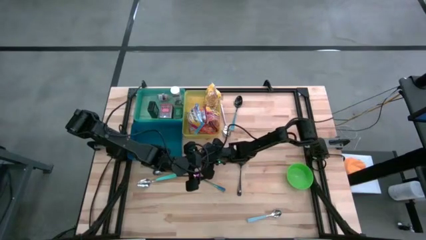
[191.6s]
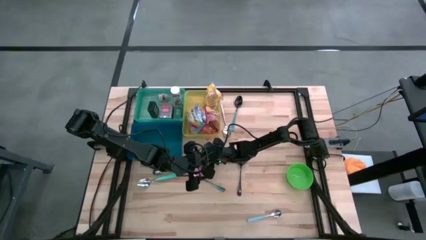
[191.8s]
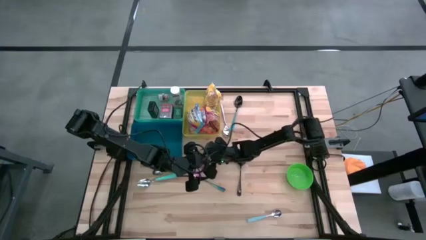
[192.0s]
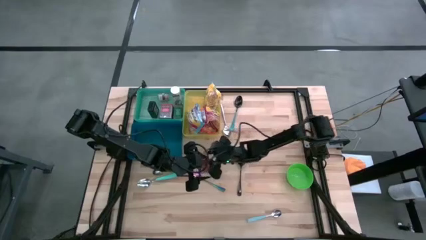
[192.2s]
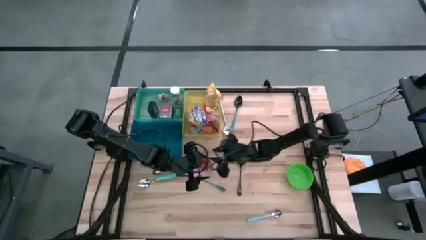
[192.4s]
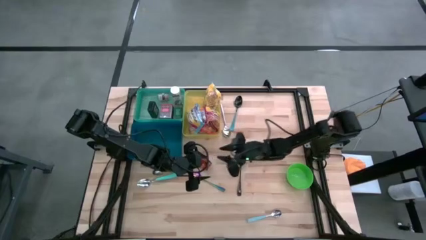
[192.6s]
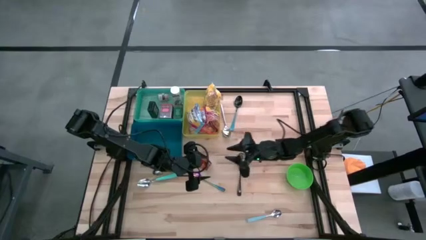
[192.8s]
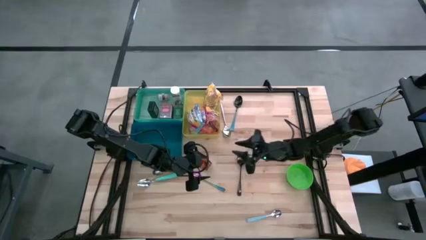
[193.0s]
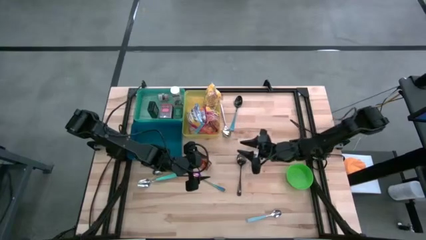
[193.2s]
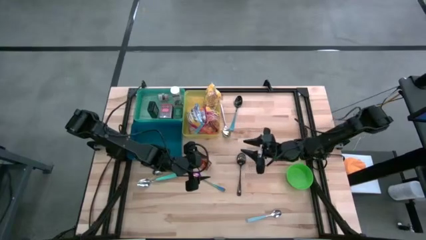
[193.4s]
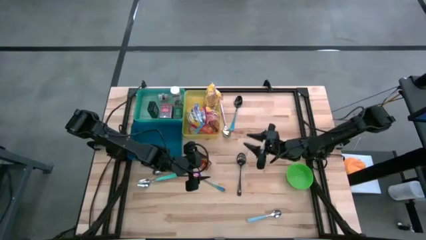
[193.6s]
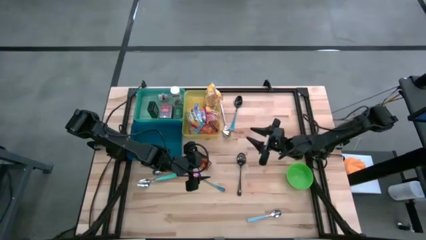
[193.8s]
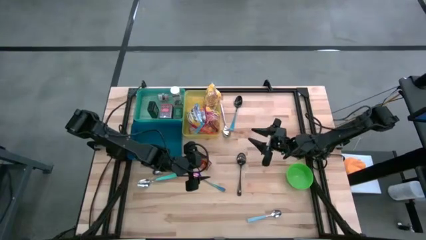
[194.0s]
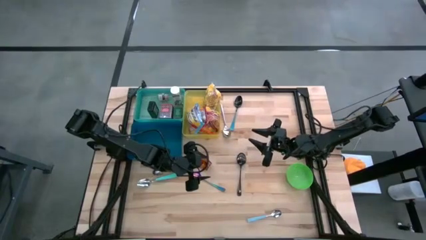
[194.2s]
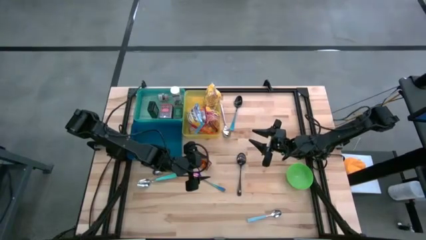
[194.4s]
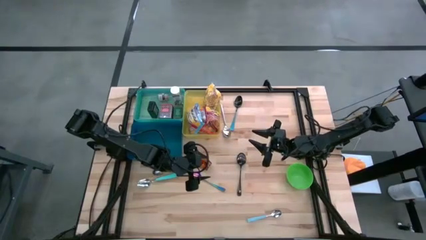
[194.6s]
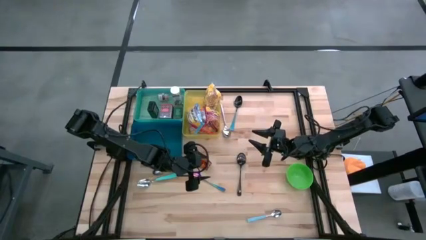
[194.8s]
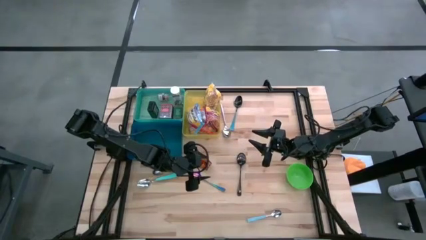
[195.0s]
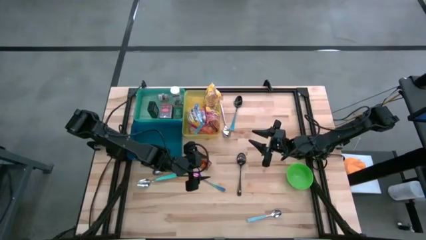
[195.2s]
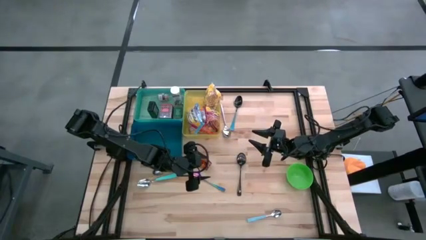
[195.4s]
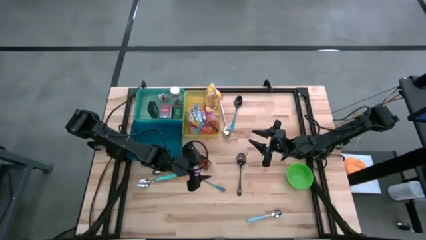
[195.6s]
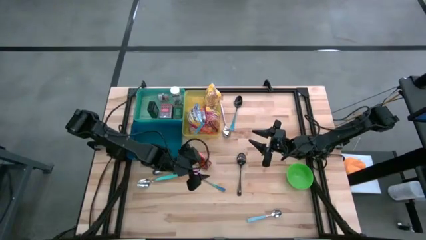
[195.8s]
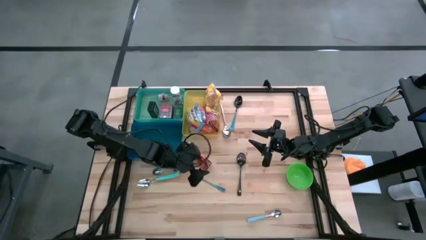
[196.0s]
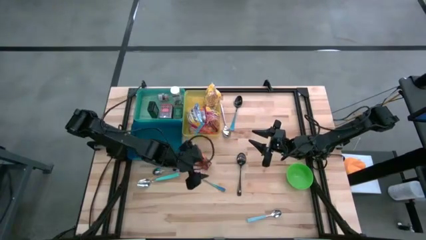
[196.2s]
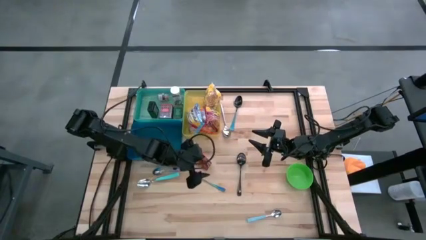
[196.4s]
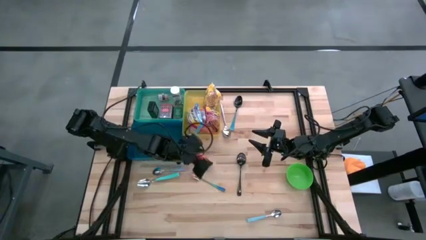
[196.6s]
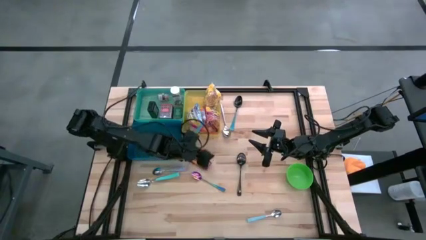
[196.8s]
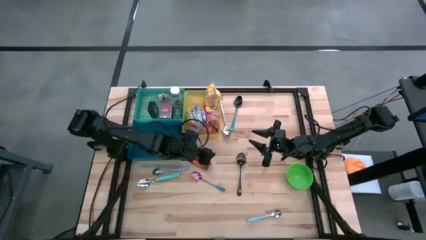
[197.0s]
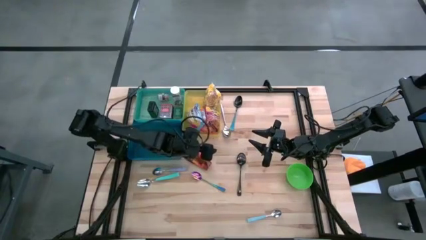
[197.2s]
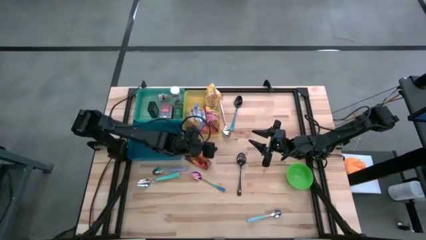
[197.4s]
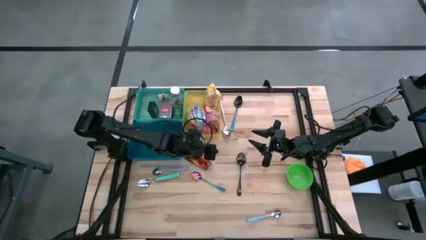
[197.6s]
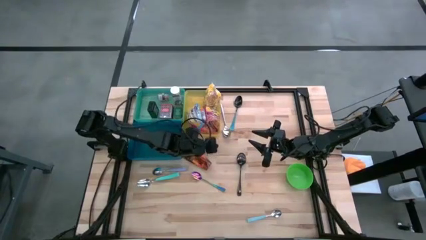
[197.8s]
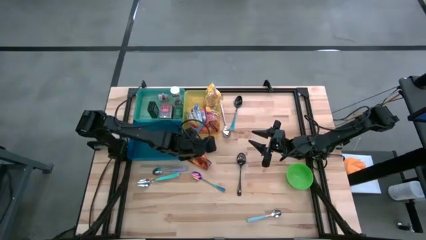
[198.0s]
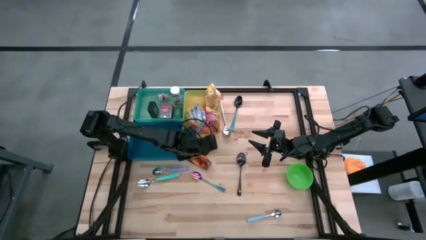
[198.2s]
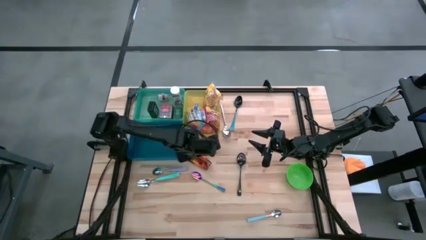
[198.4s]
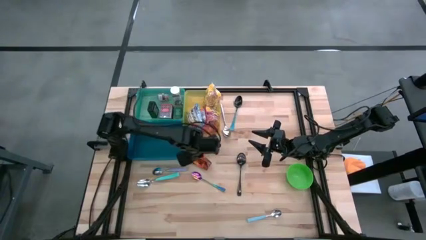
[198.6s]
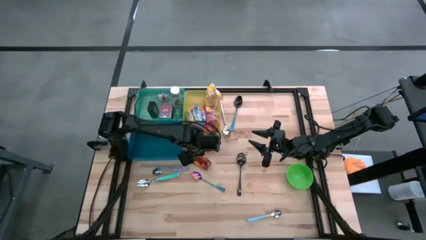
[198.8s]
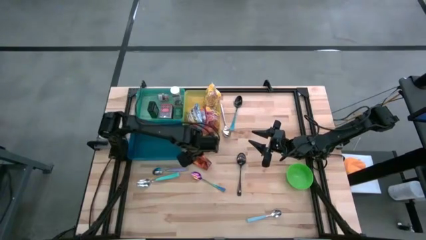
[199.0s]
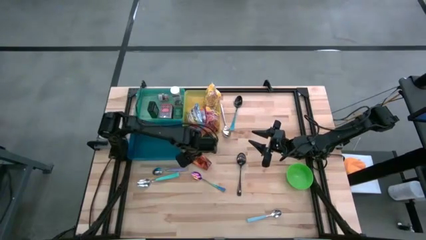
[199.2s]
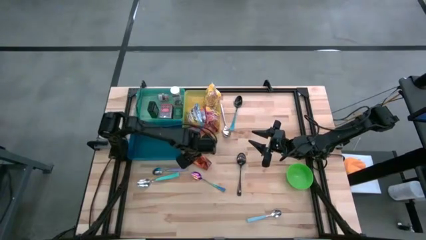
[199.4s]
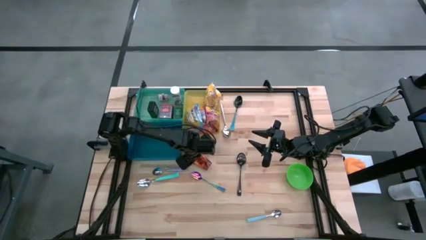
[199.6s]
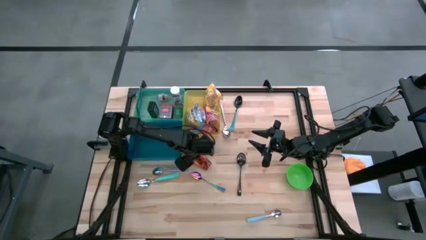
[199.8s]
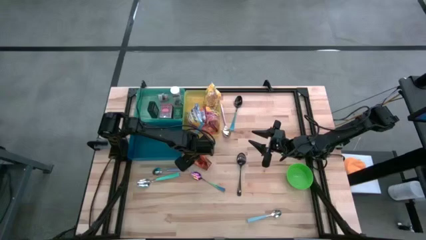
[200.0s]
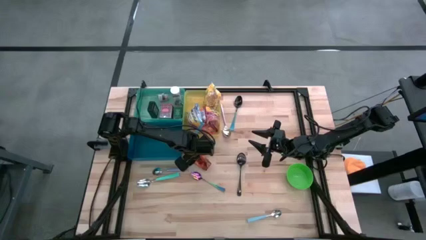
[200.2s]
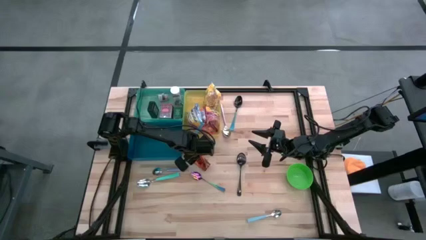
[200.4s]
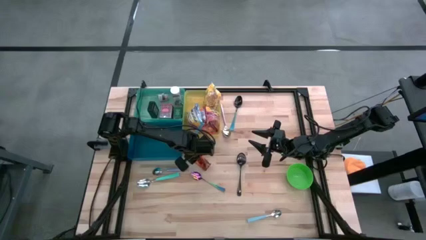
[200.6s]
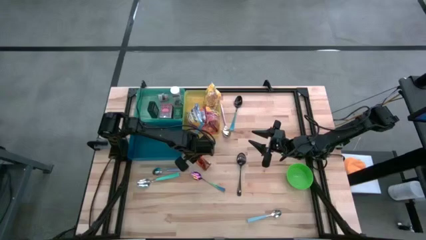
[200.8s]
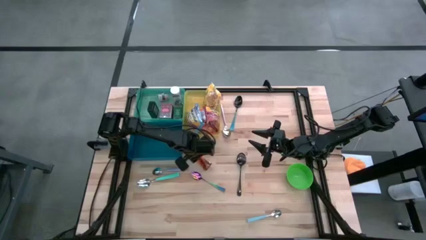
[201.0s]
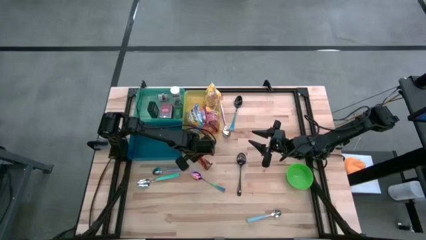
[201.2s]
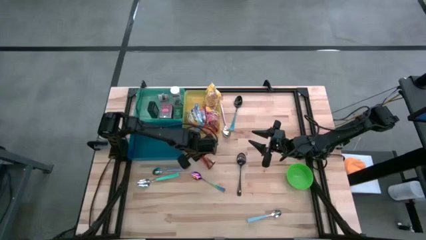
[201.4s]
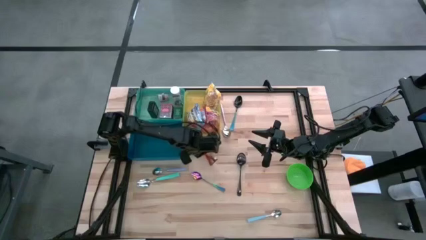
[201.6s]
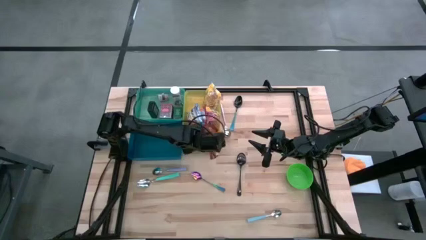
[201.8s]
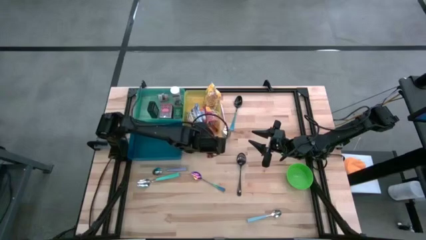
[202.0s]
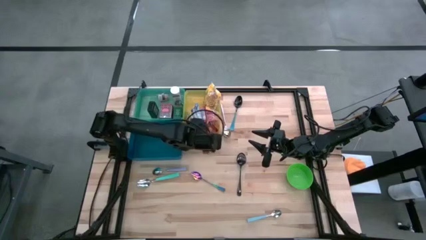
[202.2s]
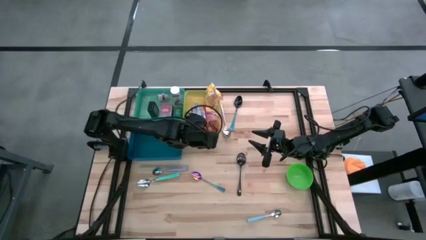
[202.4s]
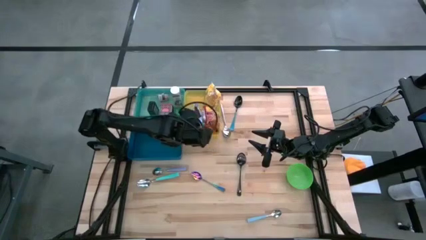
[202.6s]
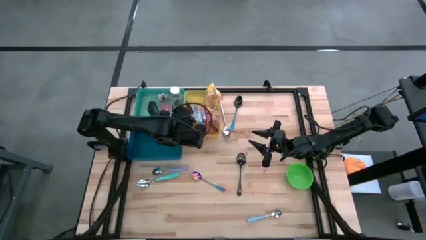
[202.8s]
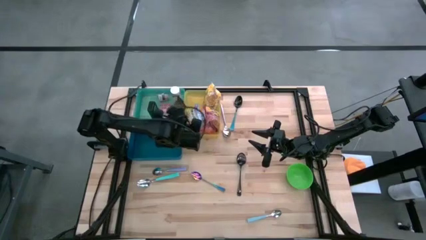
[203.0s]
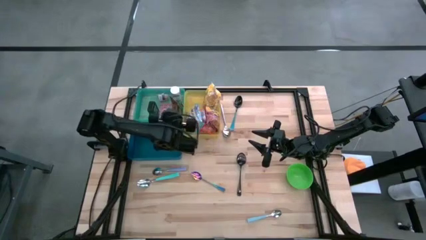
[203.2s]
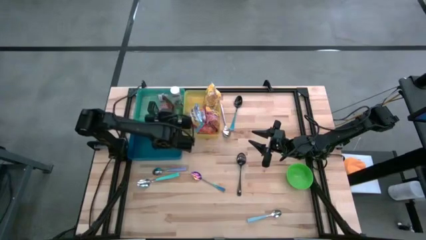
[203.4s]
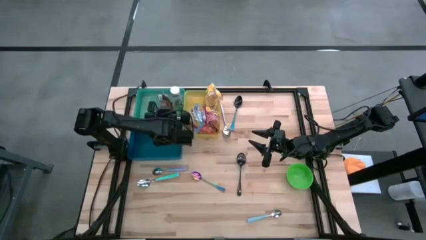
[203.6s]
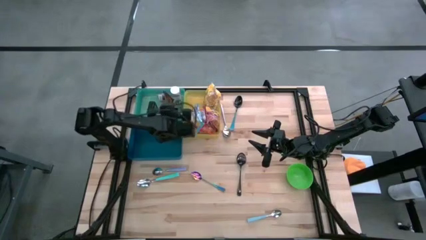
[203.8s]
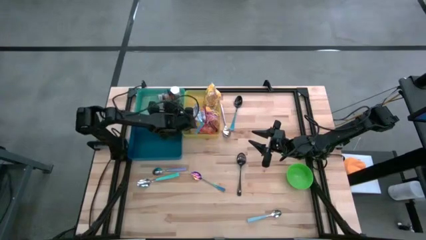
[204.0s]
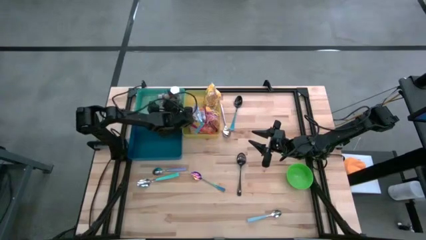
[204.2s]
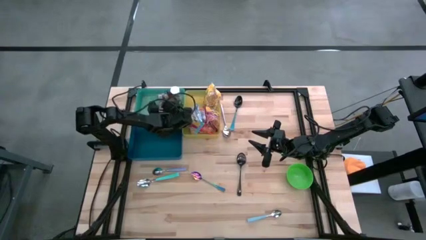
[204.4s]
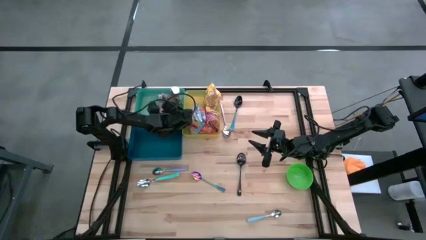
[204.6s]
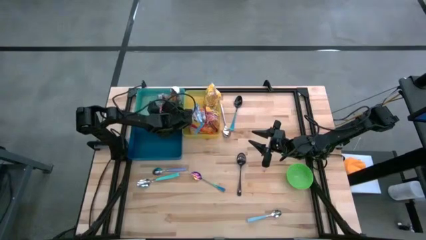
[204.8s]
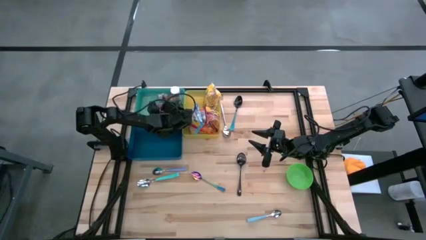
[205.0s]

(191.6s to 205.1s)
Put the orange spice pack into the green bin
